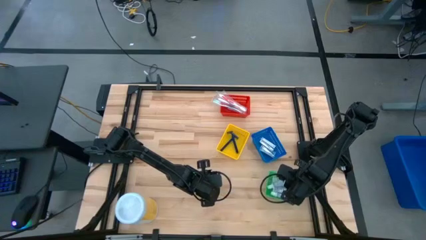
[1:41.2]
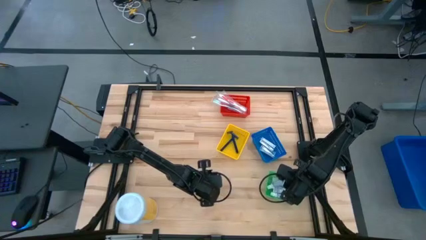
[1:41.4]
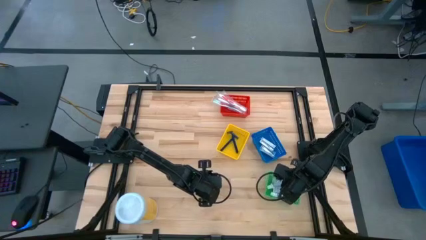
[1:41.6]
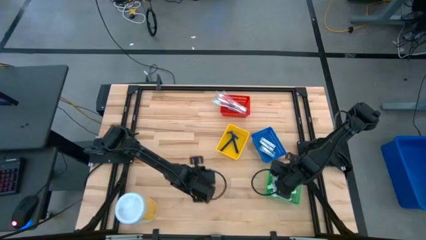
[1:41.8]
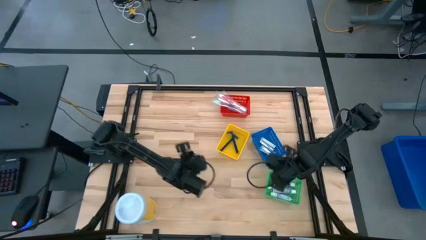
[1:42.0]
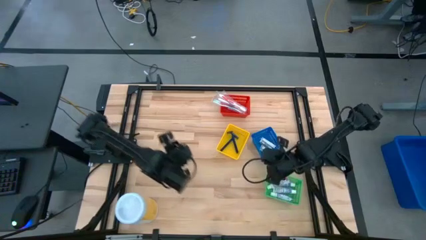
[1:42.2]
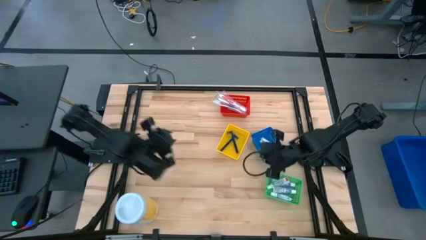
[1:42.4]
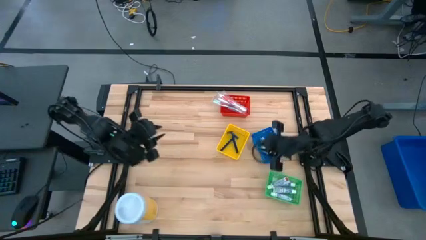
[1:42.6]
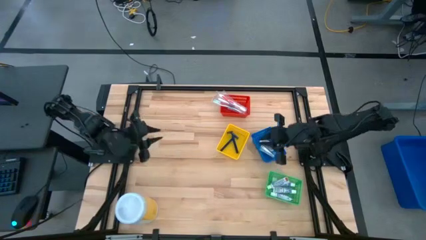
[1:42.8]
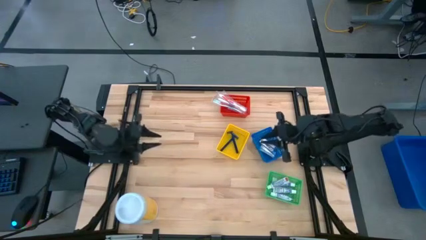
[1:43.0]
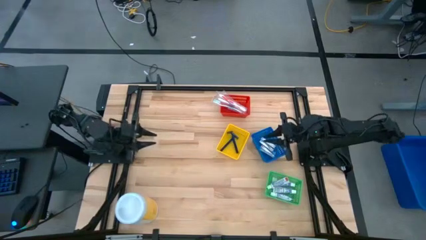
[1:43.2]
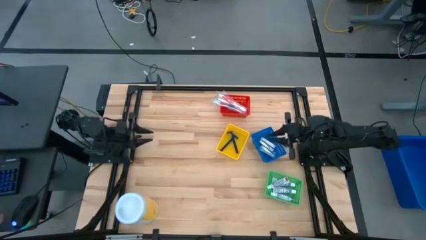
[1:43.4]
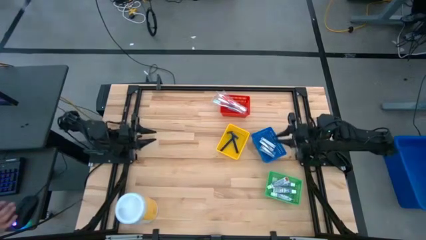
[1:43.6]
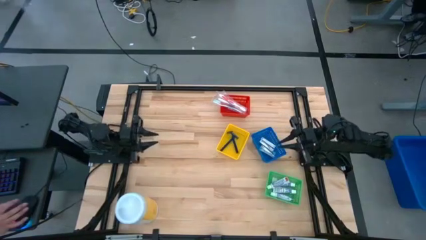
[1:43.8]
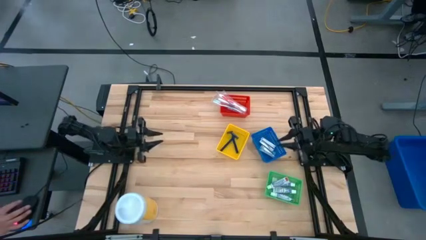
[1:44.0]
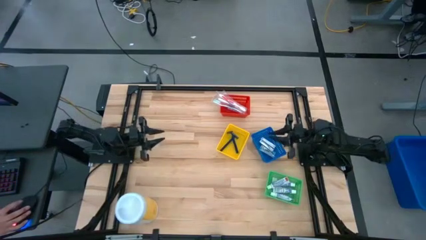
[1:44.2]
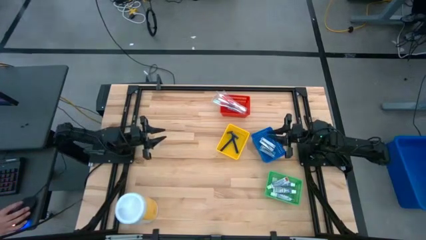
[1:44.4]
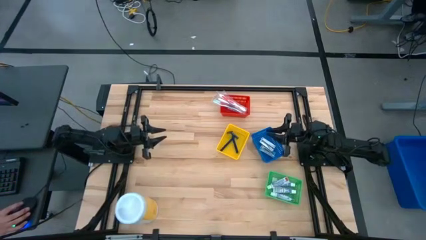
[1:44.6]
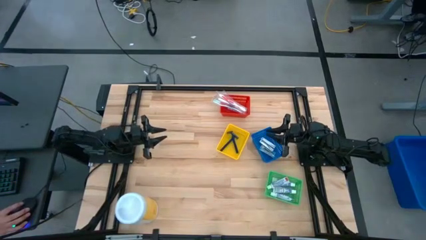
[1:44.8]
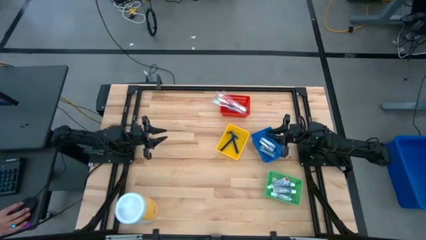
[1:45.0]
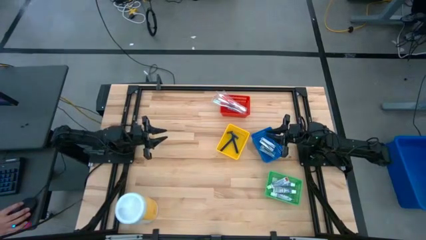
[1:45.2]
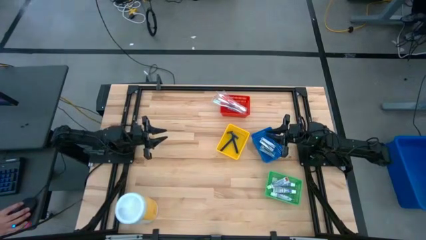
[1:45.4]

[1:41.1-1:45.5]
Task: Pick & Place Travel size toiletries
Return to home position

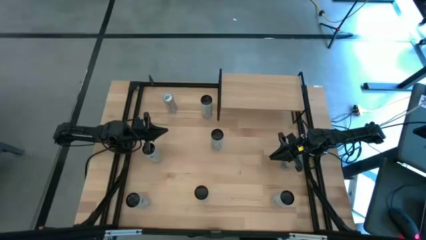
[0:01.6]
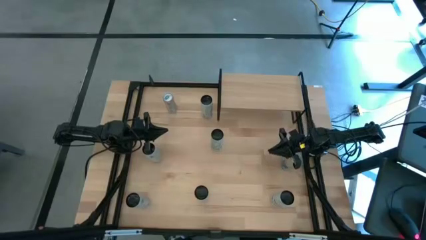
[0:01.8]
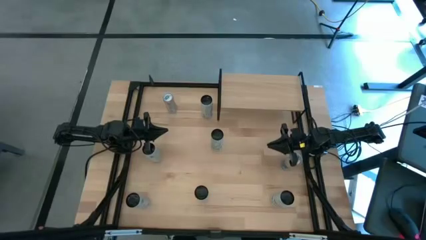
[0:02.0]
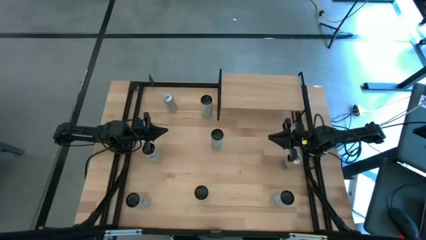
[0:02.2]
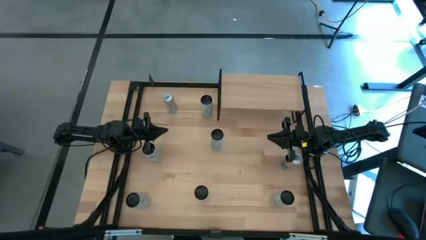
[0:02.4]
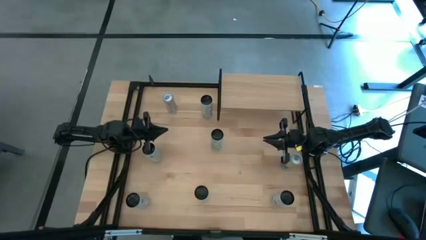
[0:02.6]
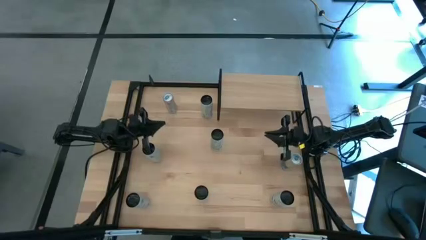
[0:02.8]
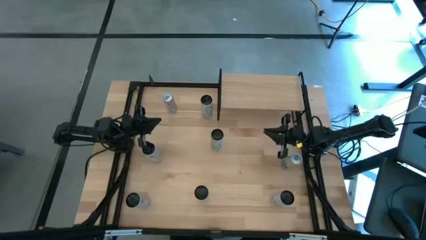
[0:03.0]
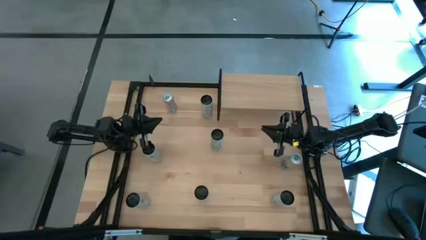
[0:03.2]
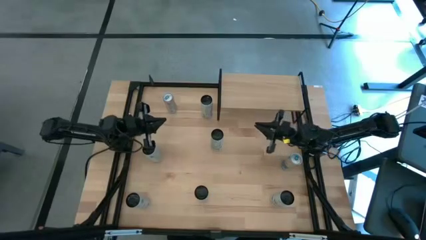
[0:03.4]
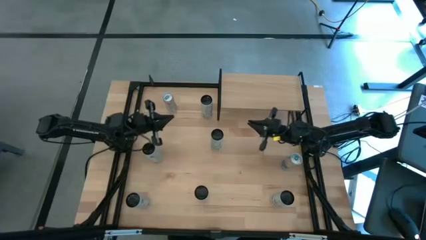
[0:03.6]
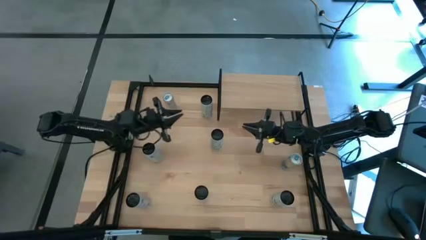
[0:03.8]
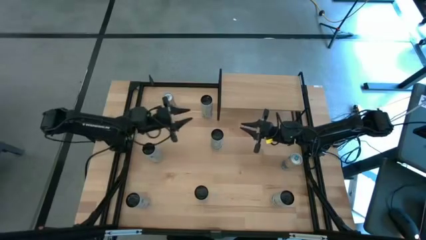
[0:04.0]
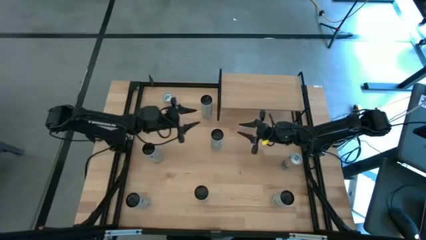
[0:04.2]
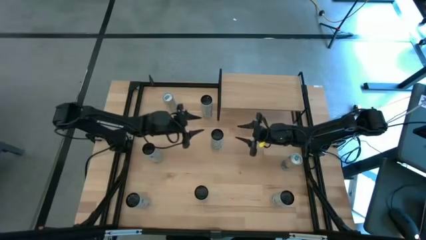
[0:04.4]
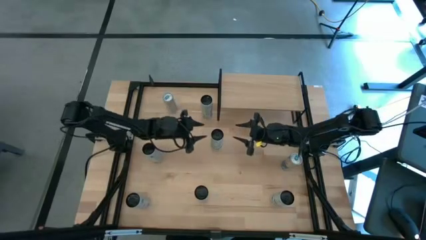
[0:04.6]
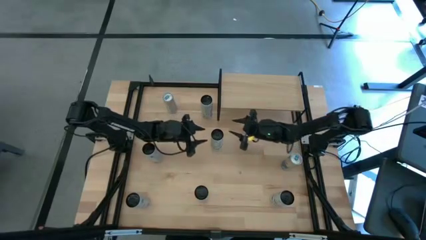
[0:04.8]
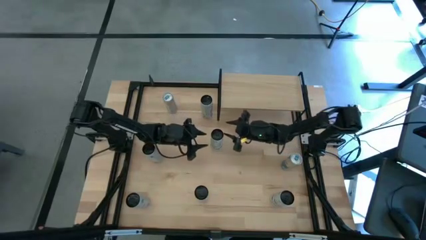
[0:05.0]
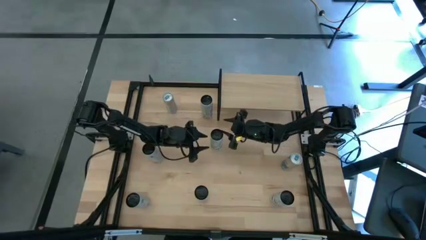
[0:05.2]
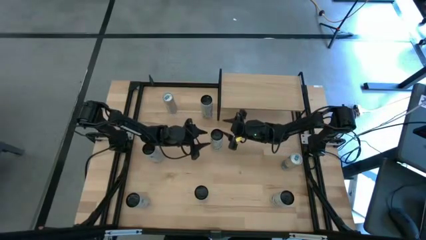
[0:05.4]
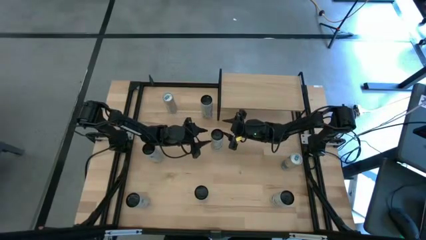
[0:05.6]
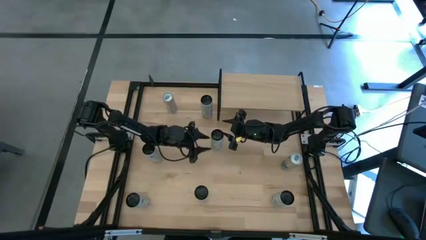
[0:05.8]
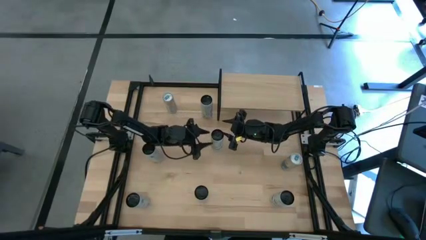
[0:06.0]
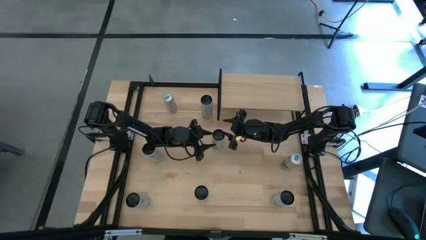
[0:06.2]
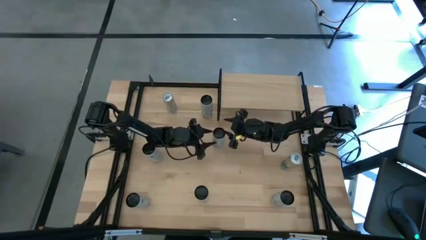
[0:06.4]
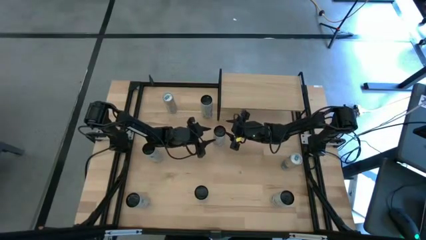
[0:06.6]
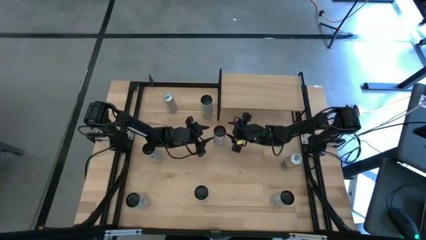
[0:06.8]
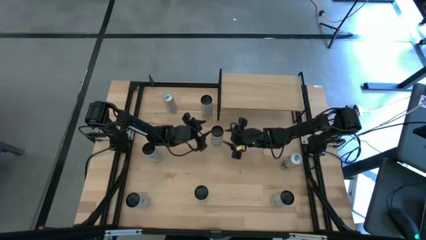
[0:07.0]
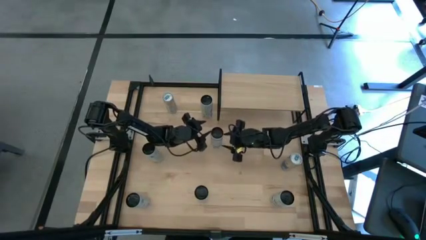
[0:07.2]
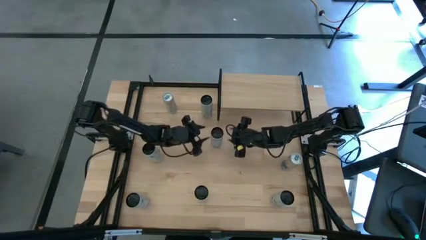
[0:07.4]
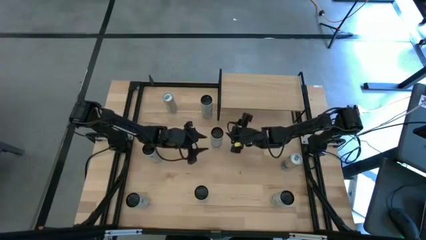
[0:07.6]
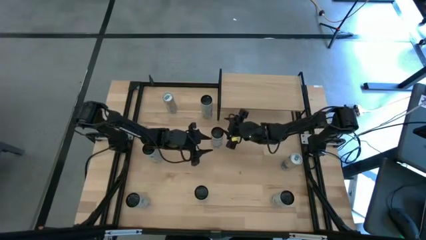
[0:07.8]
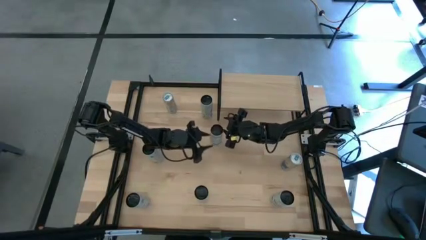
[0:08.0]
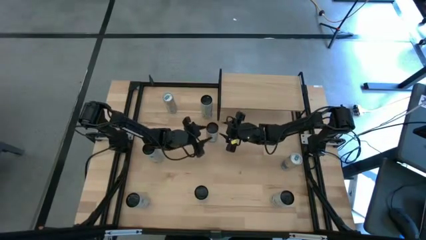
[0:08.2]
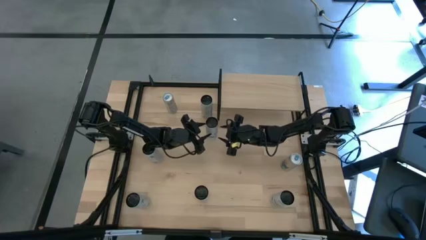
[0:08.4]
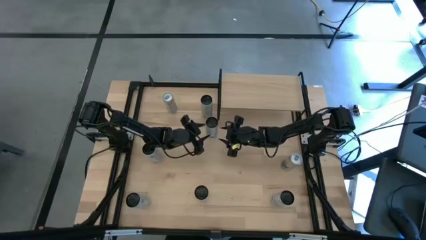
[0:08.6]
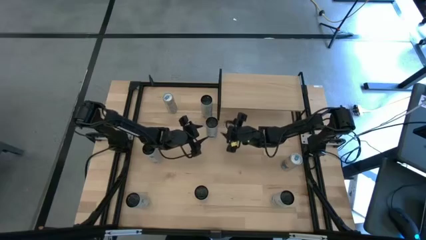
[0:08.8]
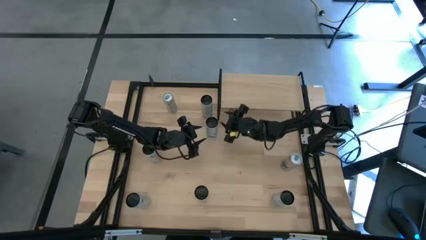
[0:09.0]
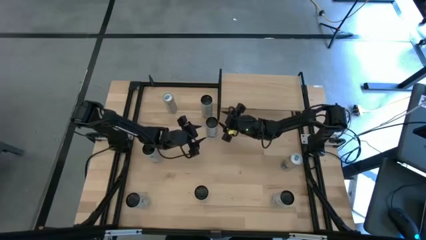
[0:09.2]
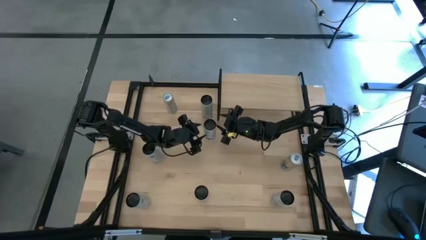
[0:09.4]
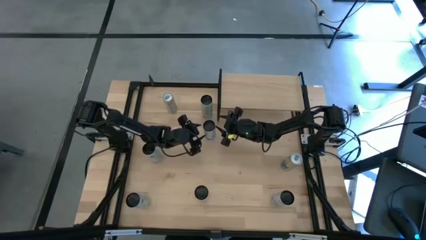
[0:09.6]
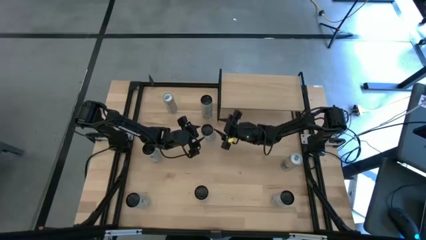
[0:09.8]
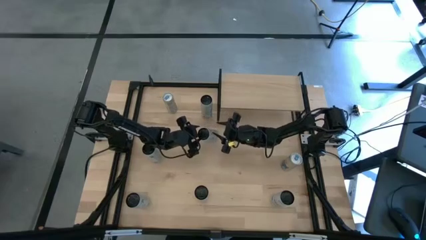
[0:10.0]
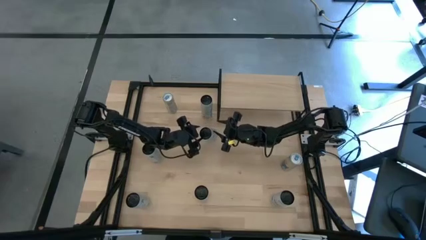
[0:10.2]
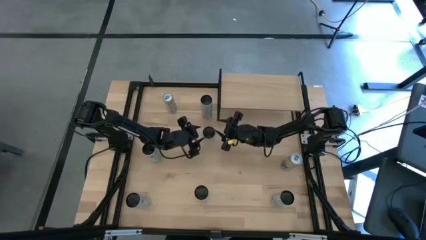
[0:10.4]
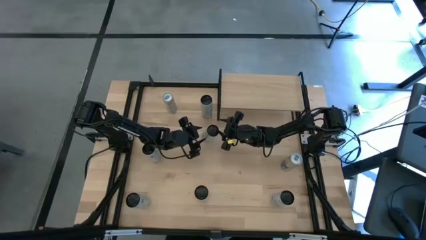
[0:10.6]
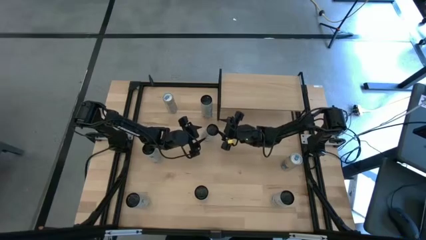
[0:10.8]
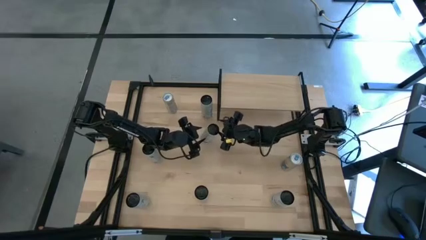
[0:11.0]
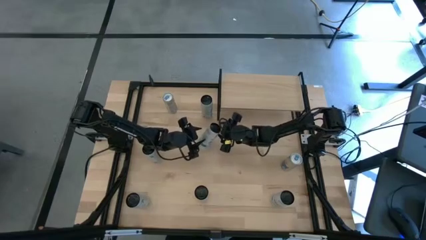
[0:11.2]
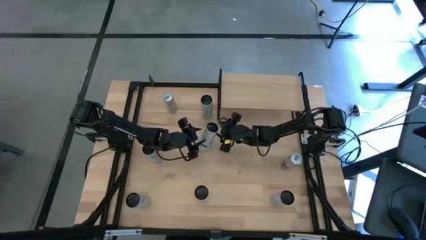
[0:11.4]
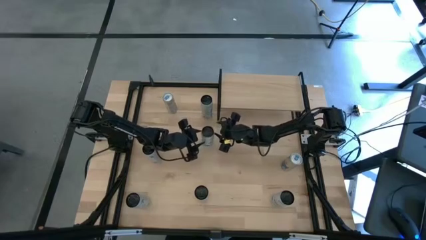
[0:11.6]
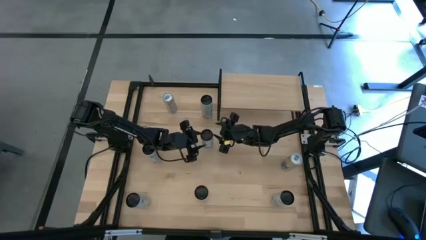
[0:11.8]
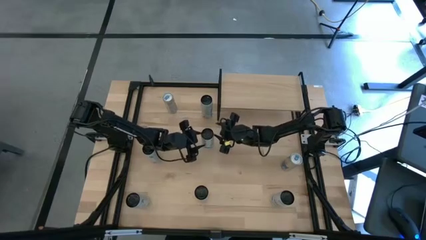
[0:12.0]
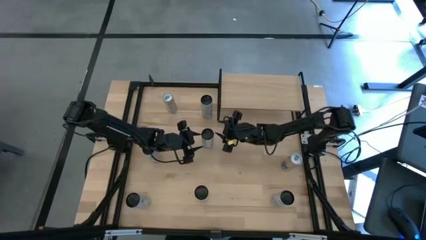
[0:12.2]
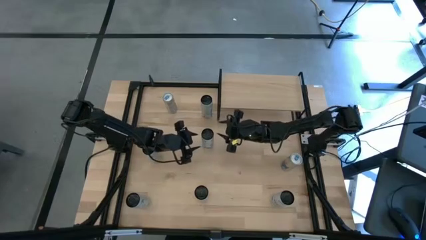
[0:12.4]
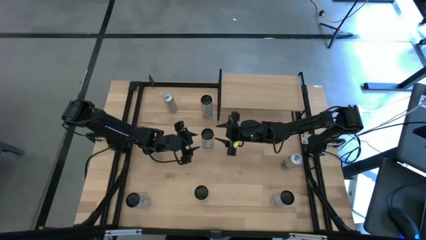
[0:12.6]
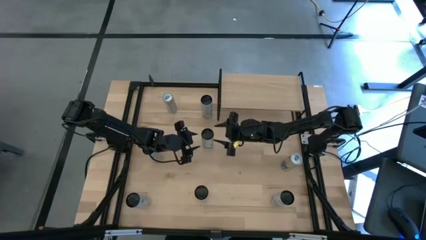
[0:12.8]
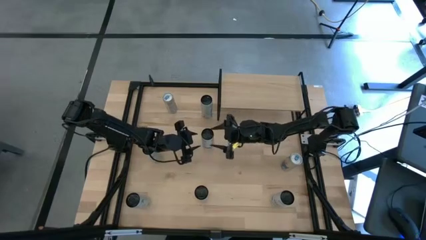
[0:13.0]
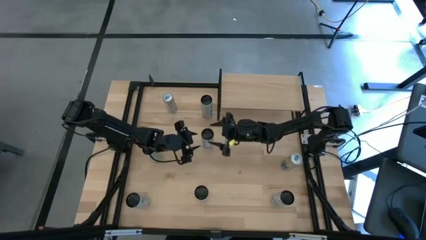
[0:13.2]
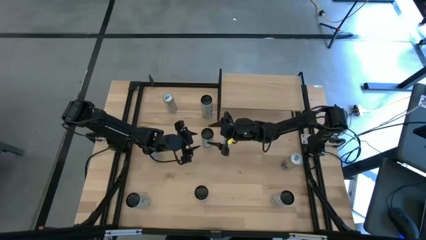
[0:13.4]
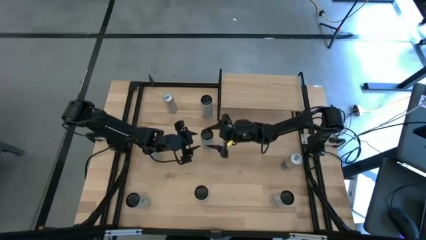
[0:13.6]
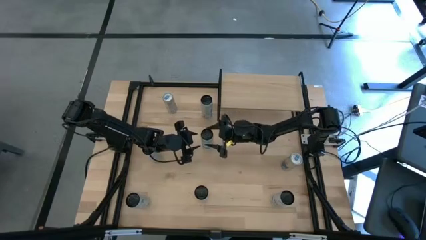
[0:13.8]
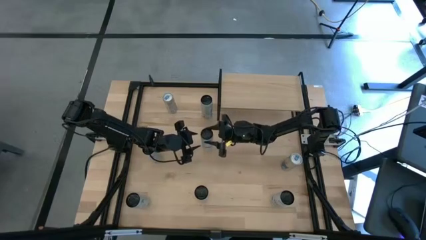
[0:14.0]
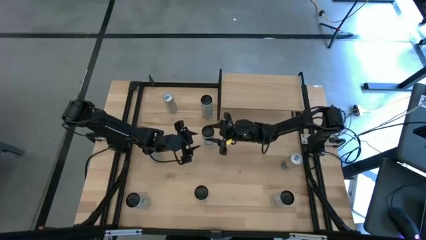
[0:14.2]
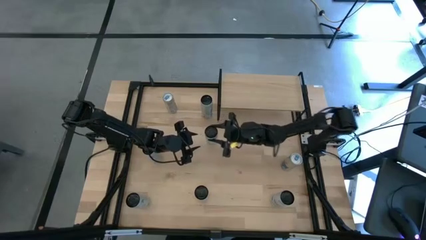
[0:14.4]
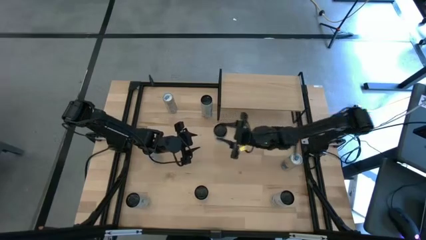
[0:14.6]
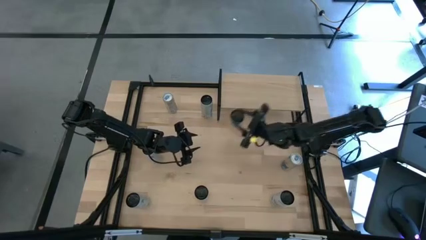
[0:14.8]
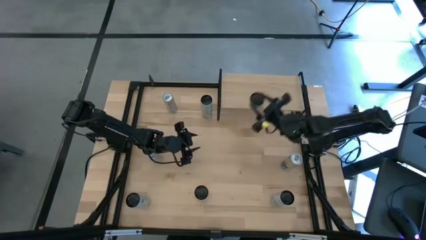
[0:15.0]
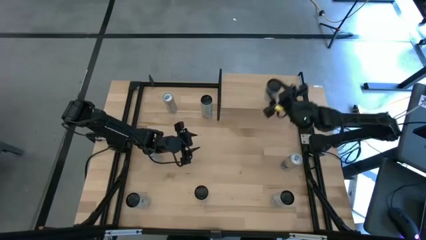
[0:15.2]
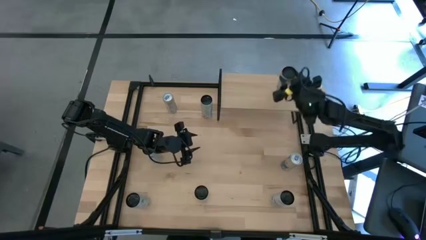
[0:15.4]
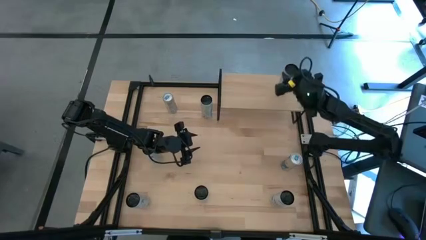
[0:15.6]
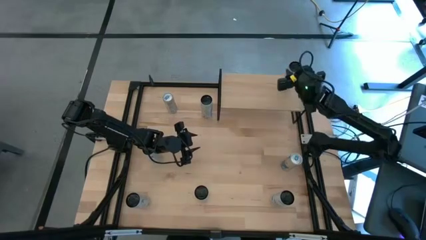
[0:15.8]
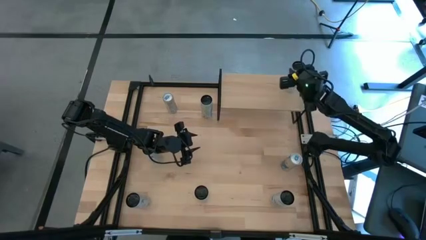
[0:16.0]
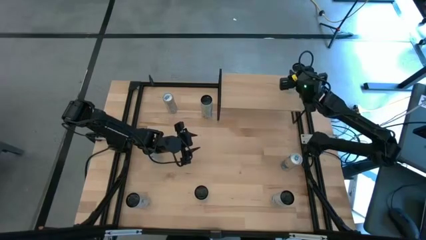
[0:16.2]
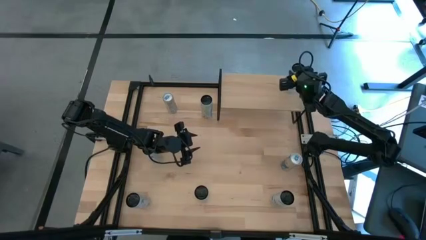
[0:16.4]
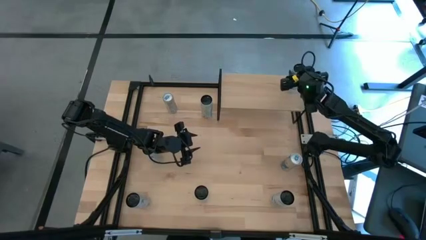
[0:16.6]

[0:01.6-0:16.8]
Task: Place canned beverage on shelf
Put the top white and blue soda can on the shelf
